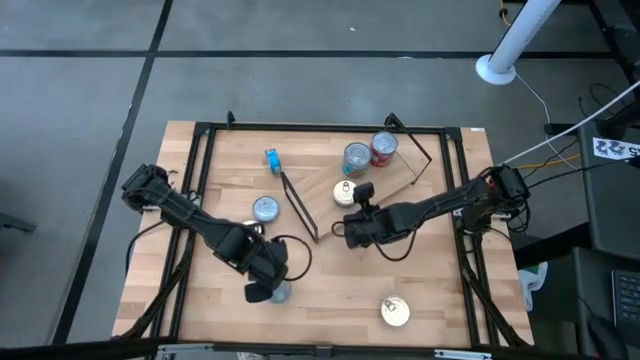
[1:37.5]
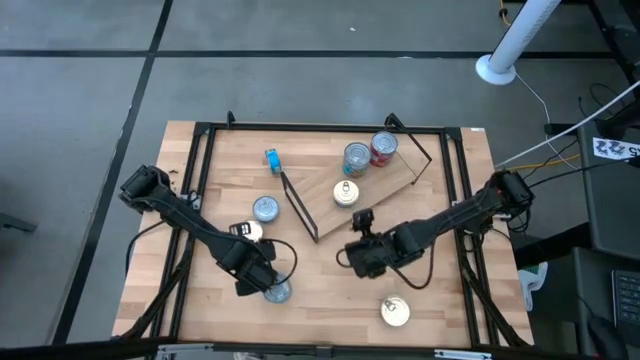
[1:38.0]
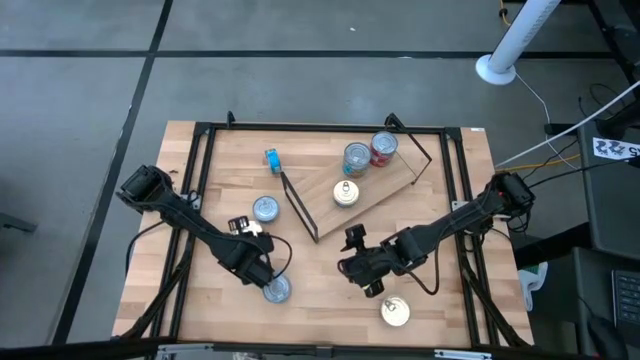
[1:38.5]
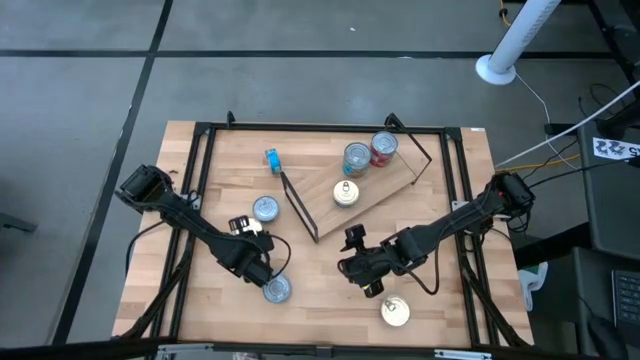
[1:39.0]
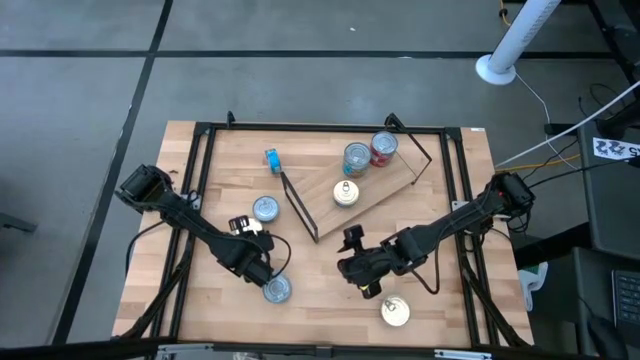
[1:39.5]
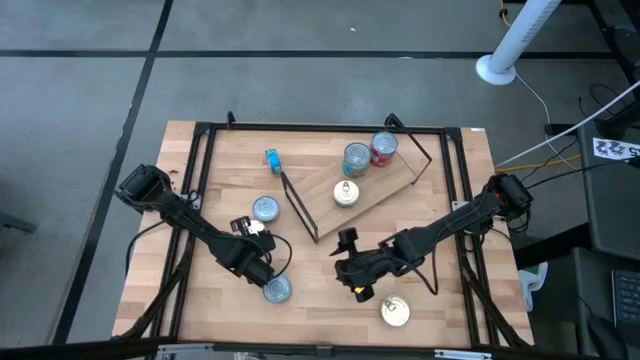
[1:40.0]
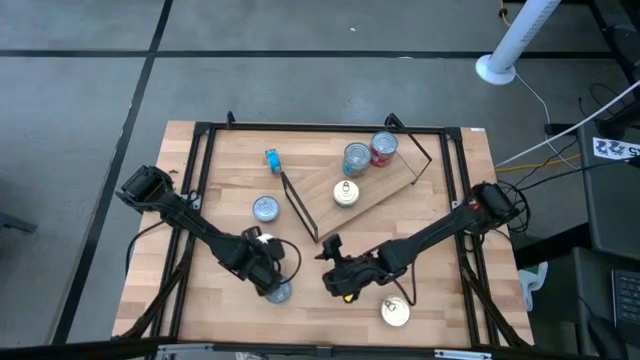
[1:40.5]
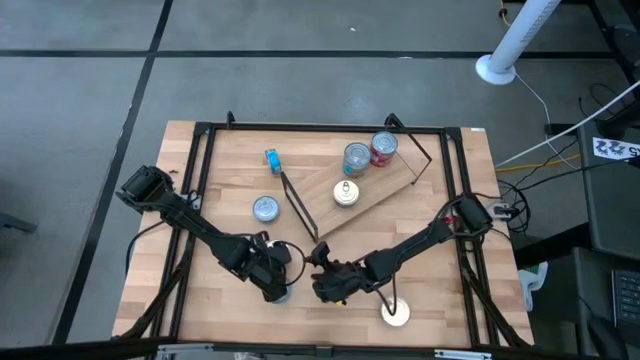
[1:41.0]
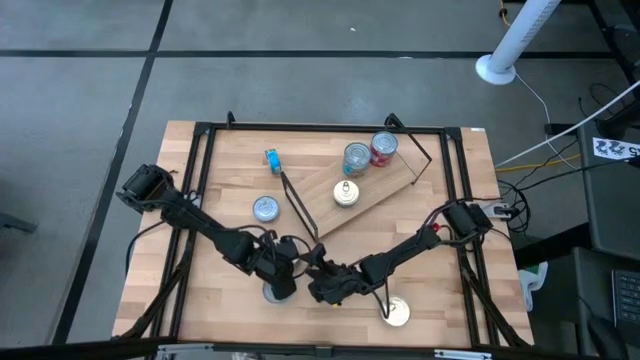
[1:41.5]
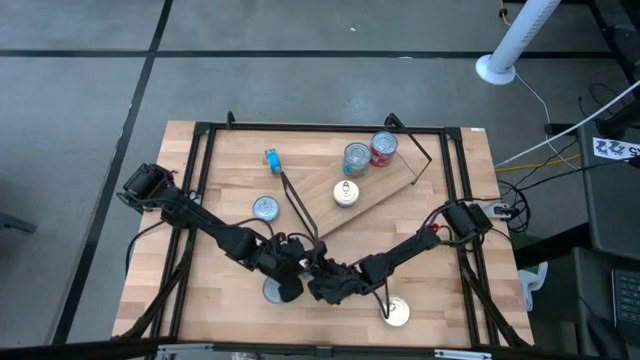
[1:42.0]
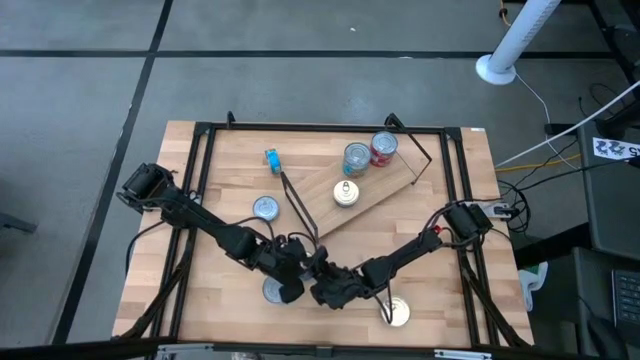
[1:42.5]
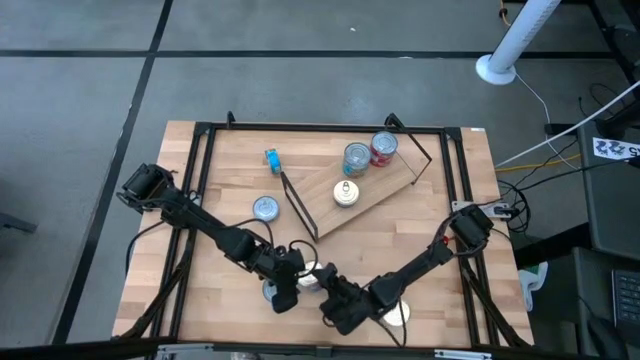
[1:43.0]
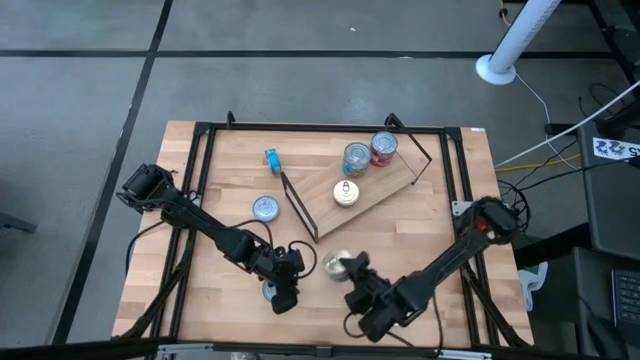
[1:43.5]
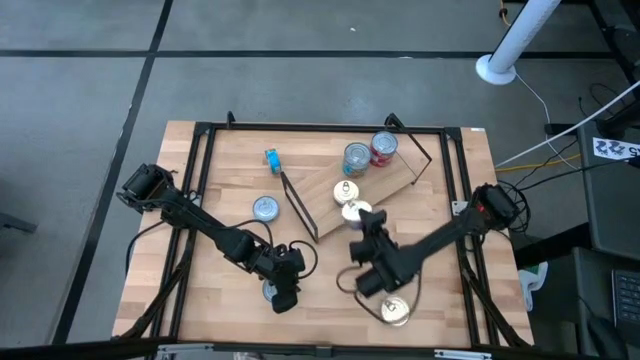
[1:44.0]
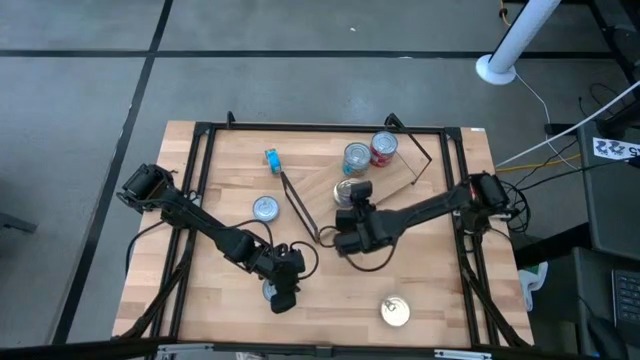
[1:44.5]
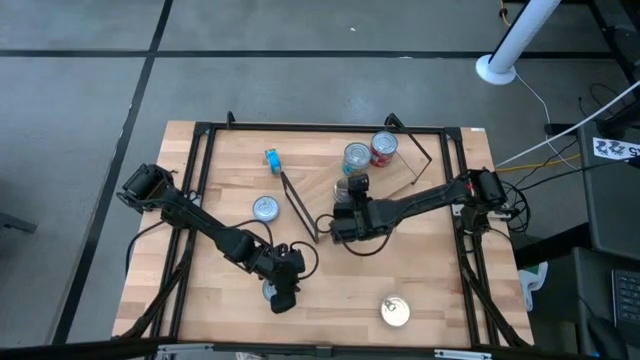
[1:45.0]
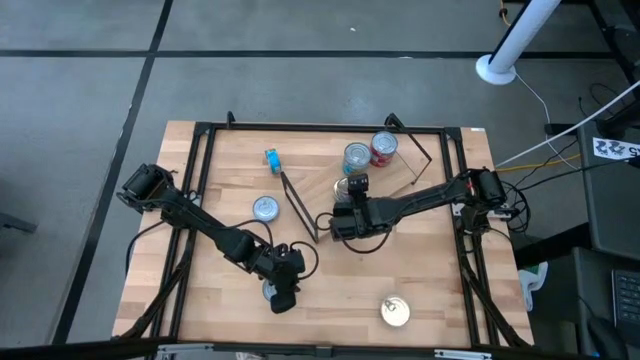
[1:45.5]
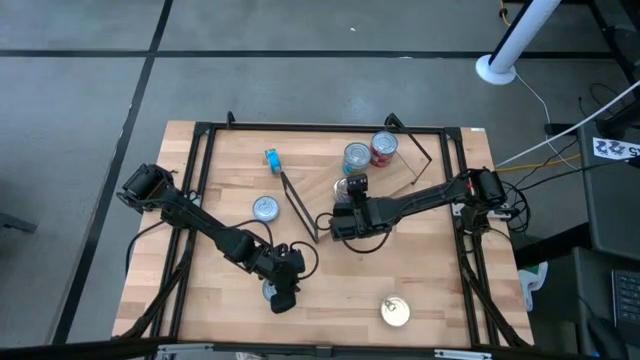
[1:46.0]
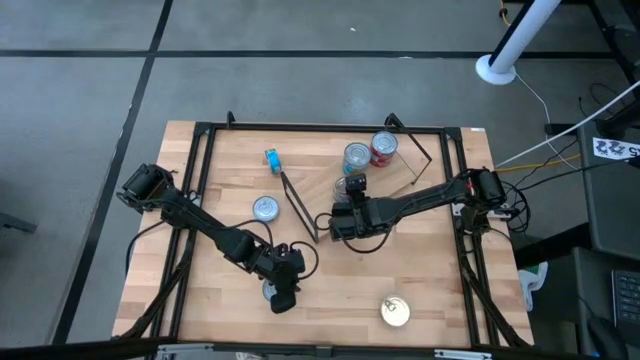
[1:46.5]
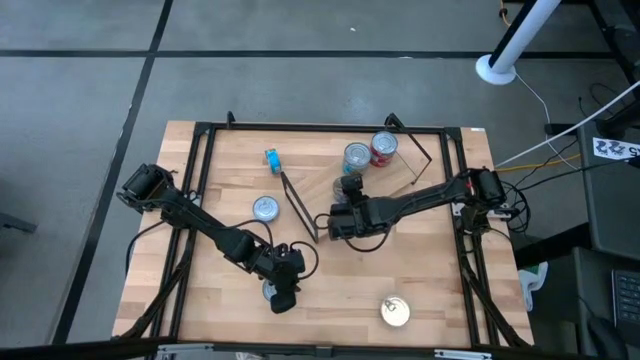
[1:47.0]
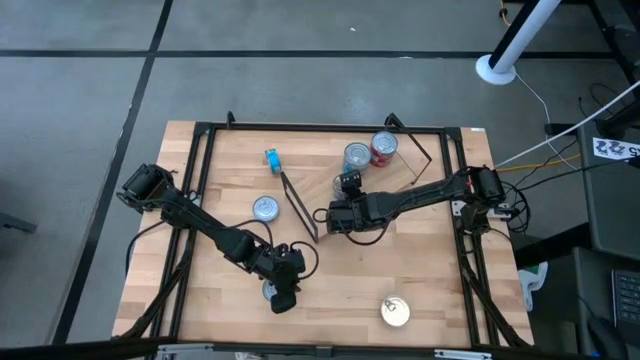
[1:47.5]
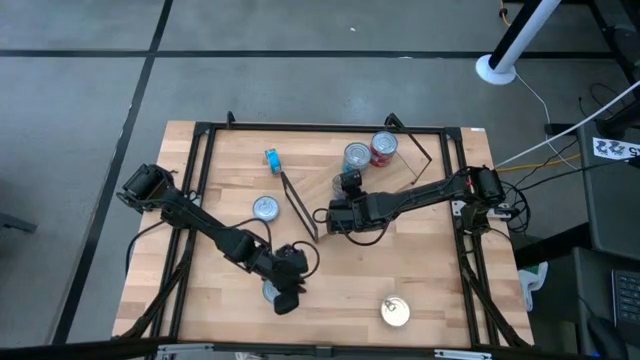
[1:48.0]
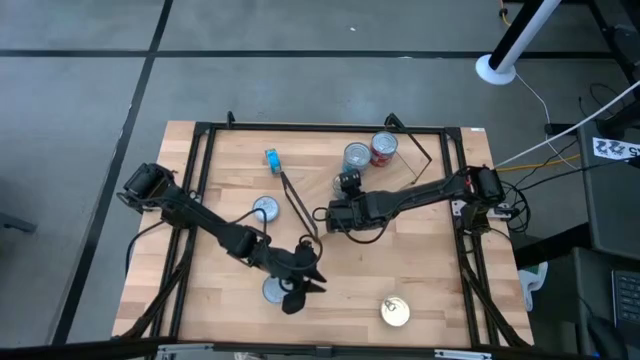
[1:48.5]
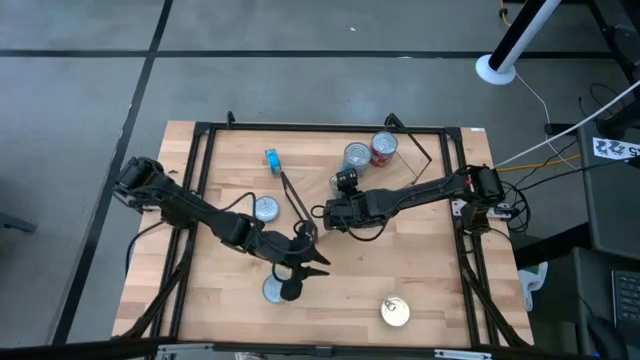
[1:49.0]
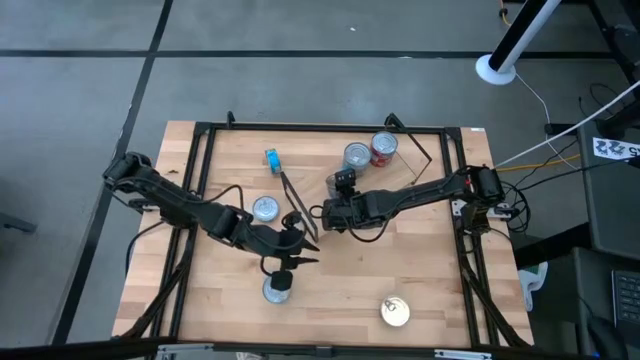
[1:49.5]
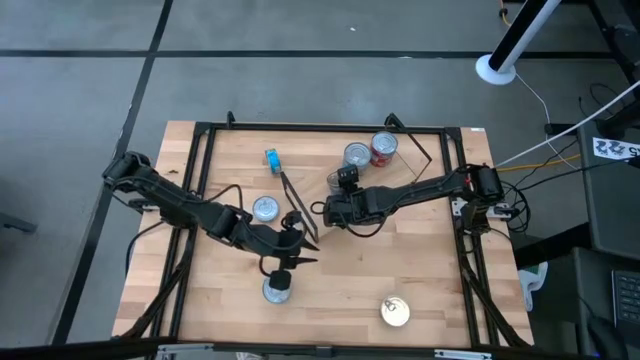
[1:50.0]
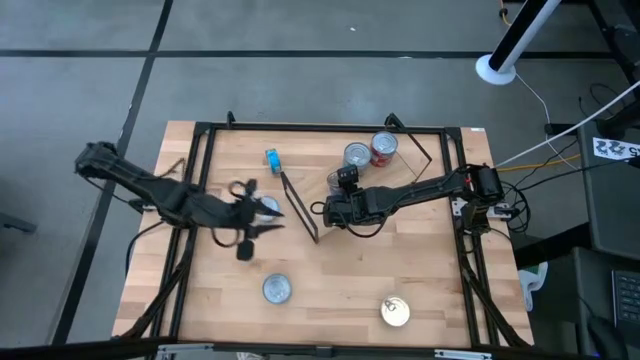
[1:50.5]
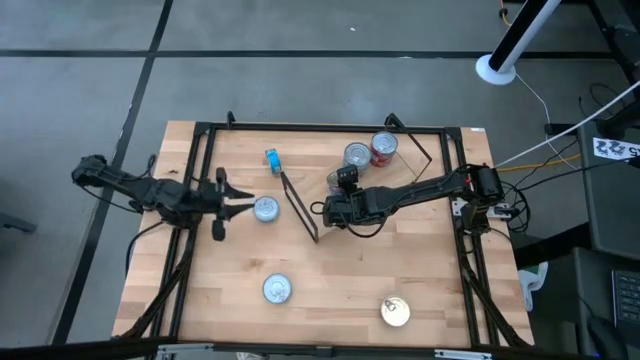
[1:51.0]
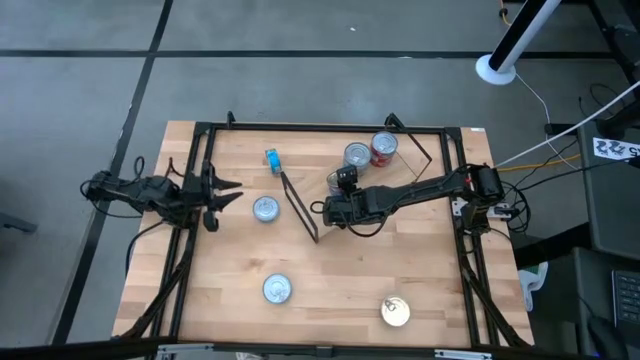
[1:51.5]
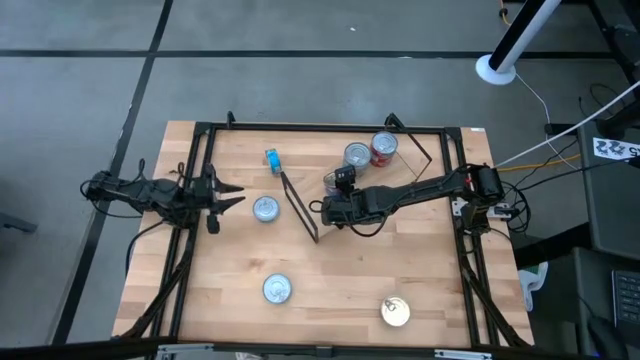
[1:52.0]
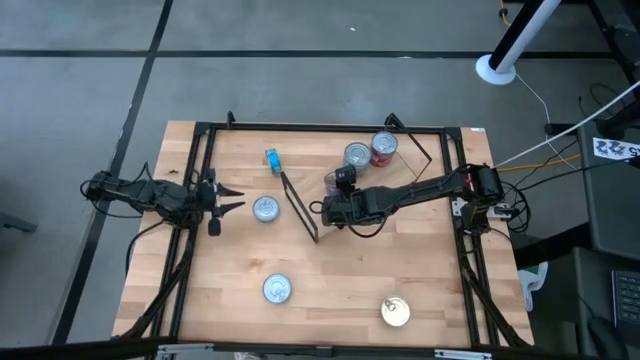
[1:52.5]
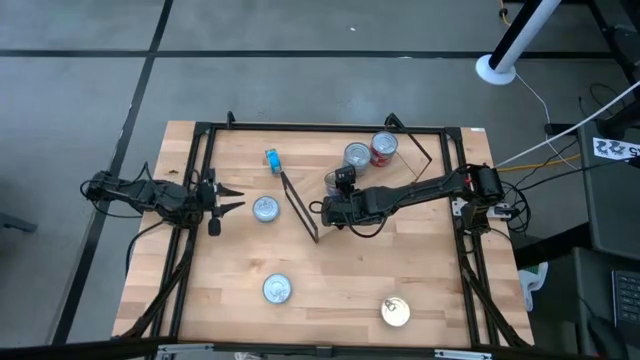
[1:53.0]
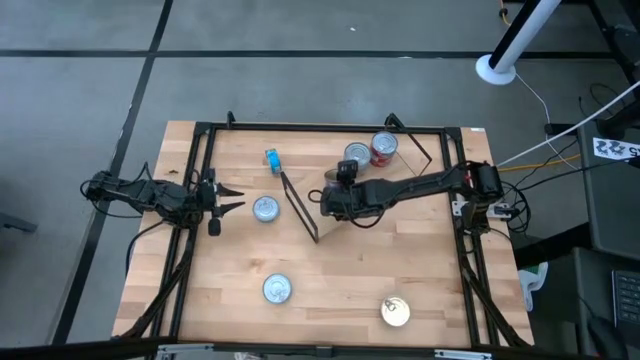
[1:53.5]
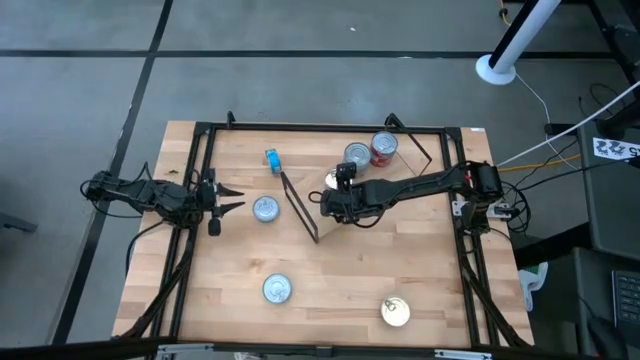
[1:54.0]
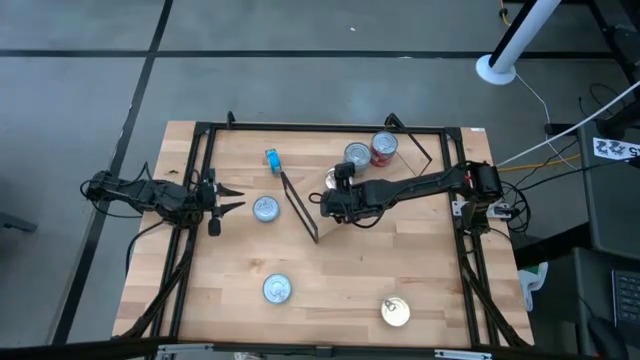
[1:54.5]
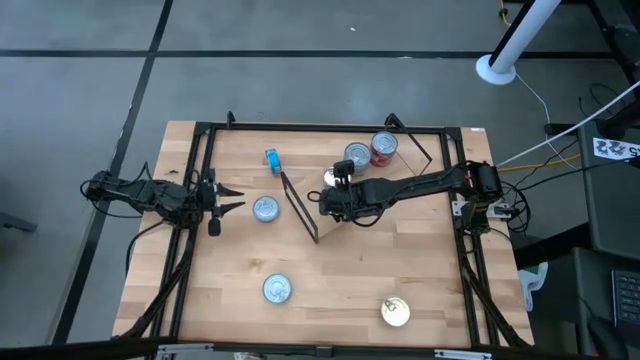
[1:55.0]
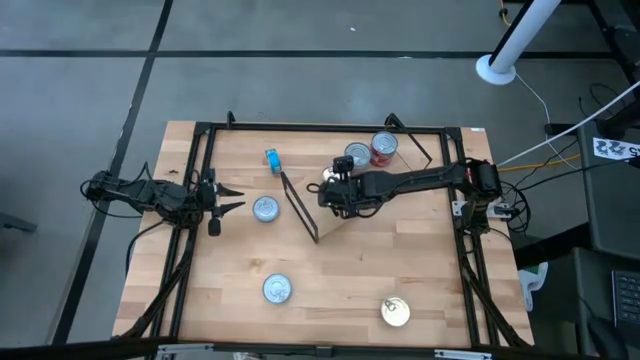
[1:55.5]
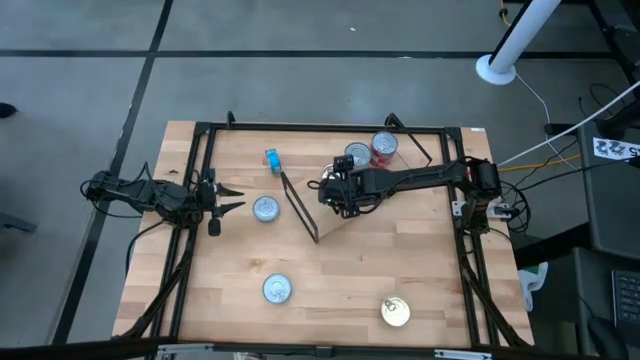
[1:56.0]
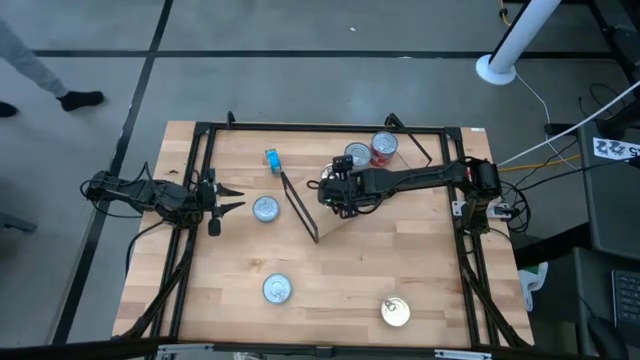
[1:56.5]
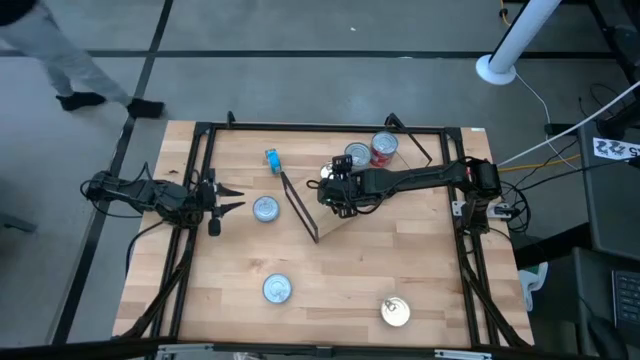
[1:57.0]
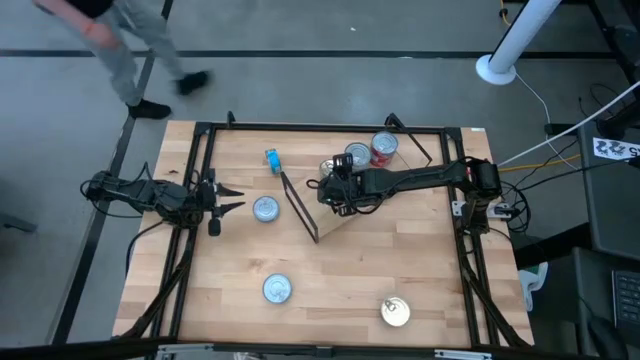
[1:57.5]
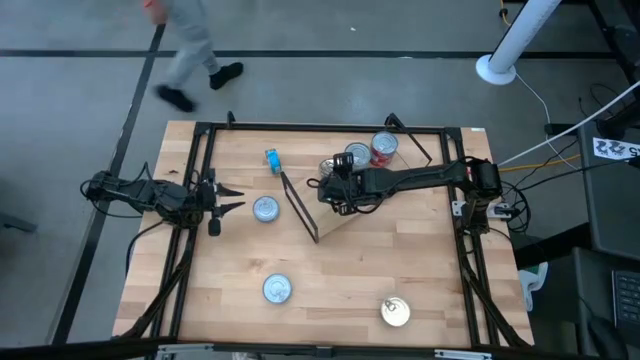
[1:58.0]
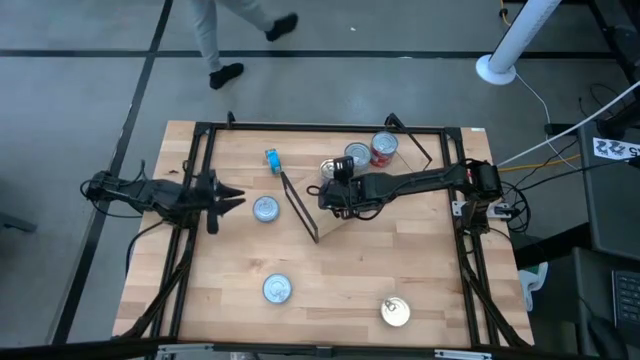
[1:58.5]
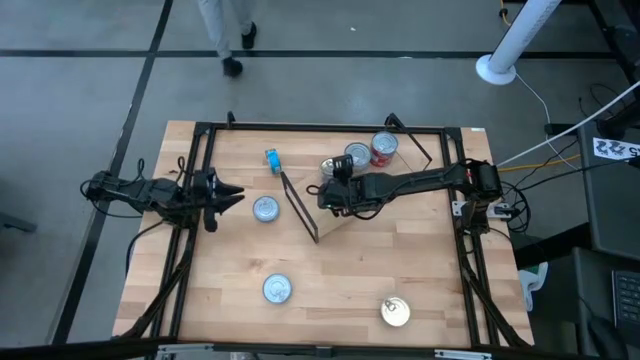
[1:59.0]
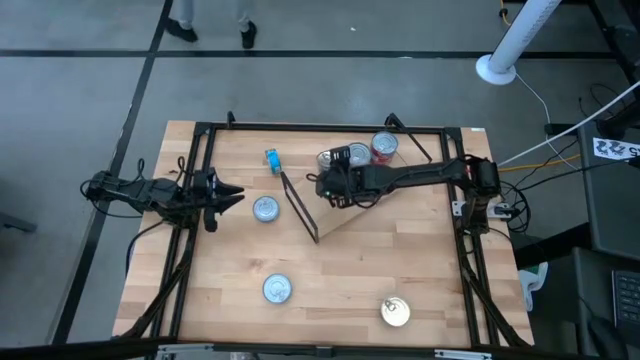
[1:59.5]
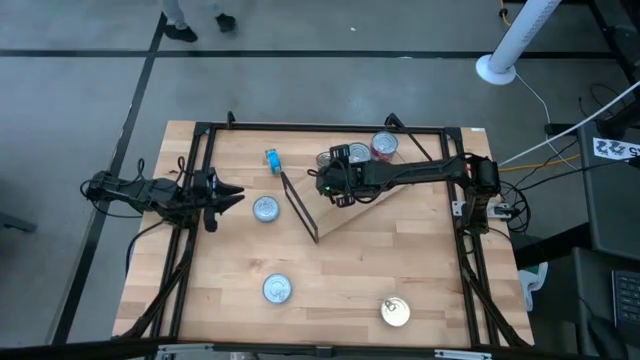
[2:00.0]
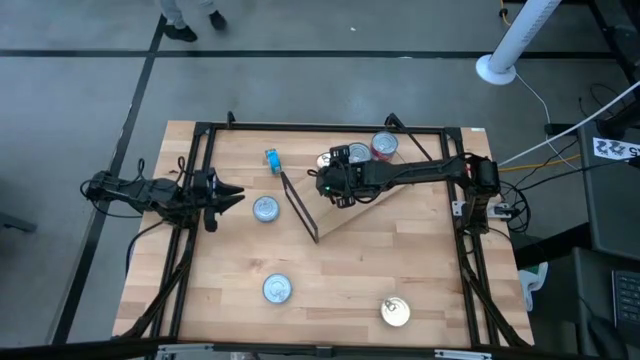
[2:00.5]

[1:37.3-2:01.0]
Task: Stack canned seafood by type on shelf
Stack the left blue tuna can on top of the blue tuna can on the shelf
